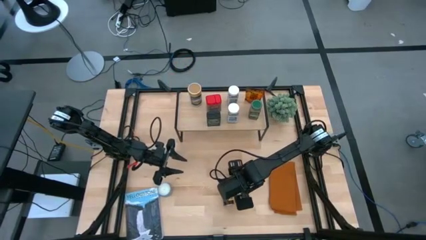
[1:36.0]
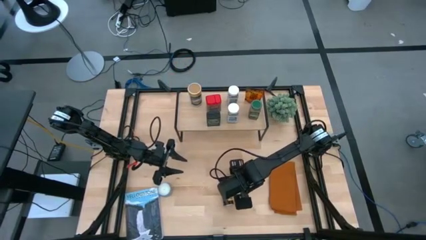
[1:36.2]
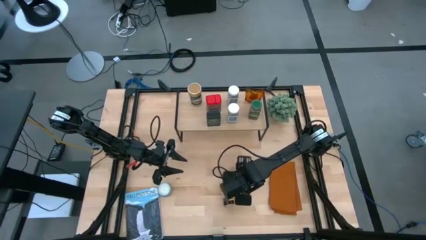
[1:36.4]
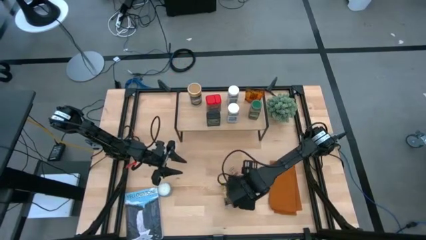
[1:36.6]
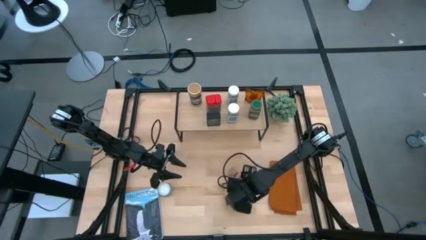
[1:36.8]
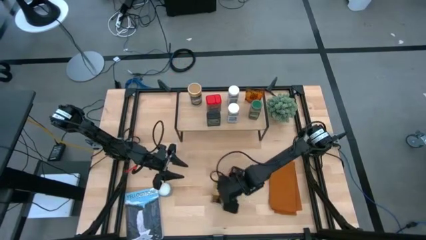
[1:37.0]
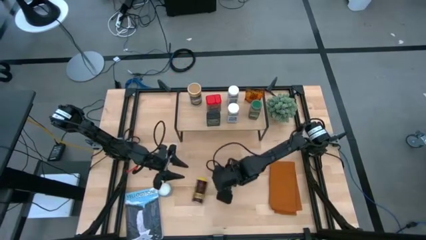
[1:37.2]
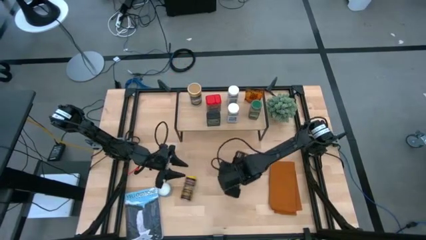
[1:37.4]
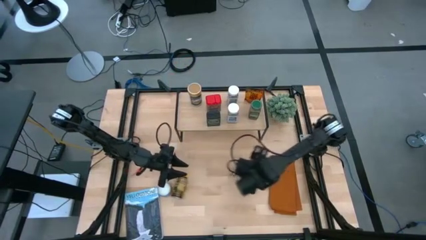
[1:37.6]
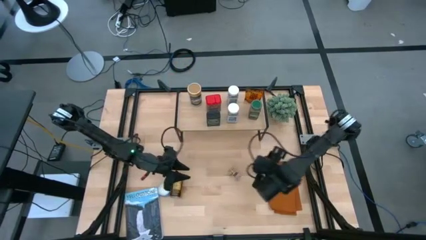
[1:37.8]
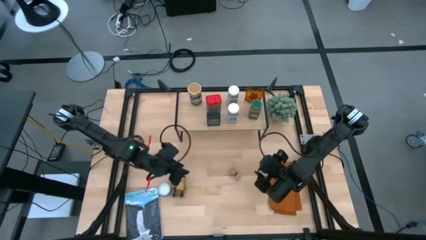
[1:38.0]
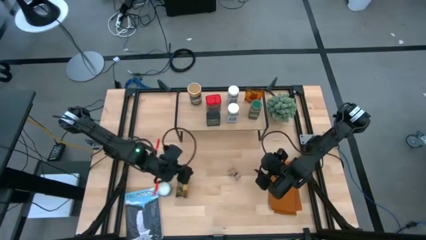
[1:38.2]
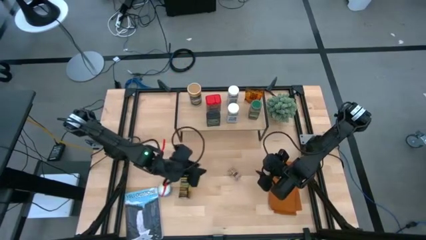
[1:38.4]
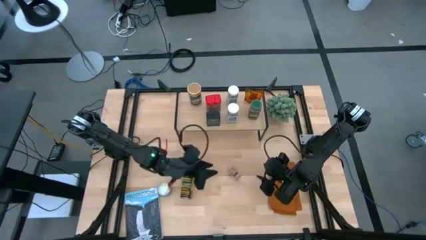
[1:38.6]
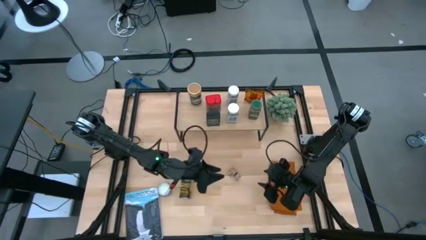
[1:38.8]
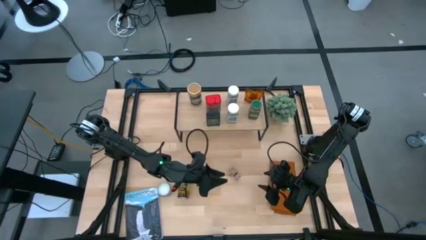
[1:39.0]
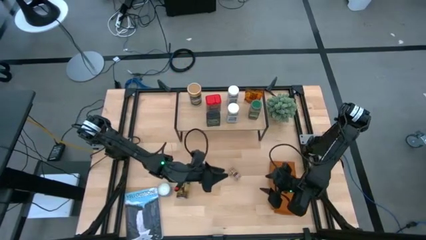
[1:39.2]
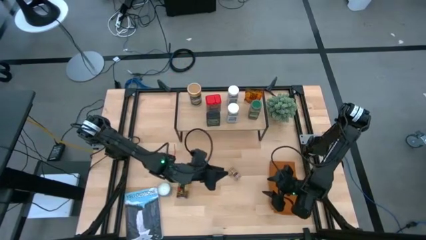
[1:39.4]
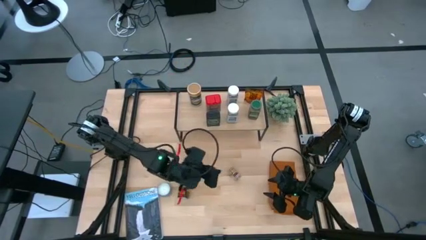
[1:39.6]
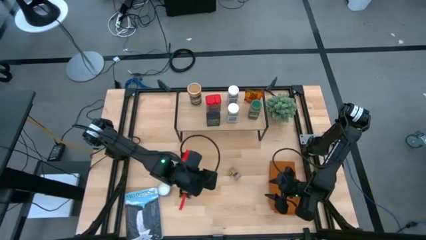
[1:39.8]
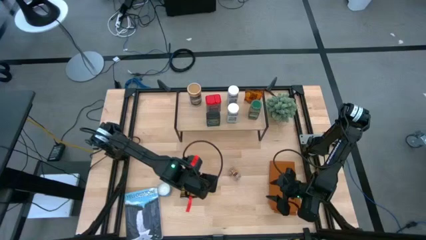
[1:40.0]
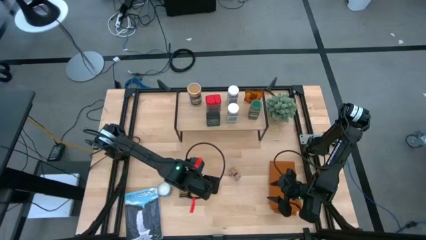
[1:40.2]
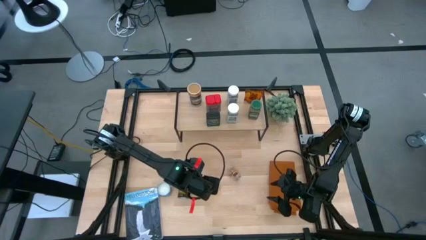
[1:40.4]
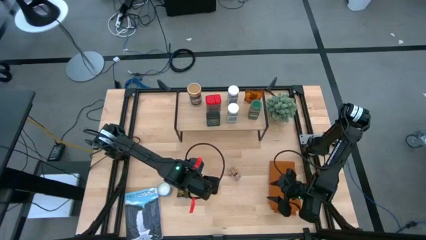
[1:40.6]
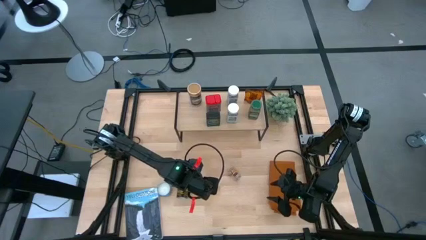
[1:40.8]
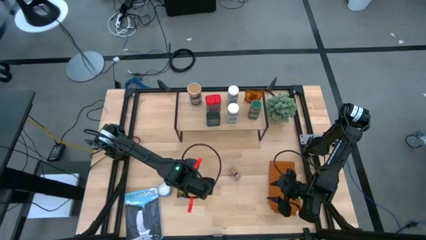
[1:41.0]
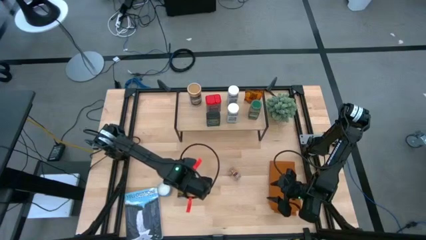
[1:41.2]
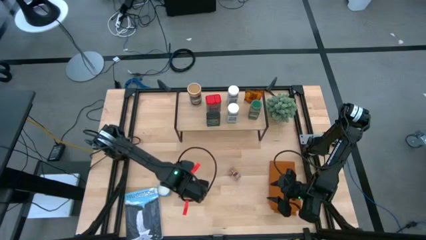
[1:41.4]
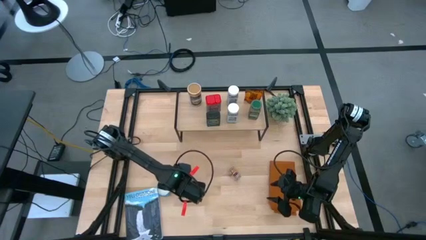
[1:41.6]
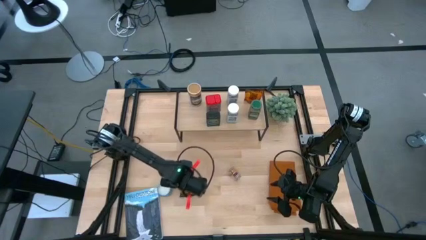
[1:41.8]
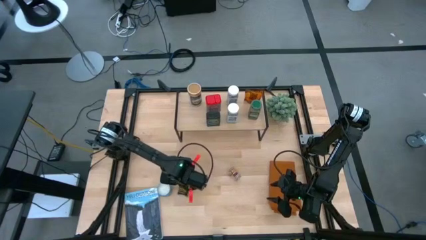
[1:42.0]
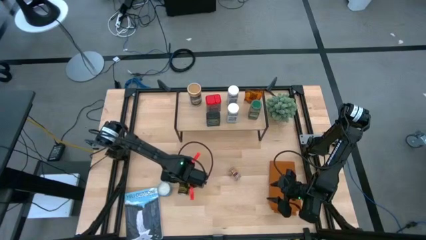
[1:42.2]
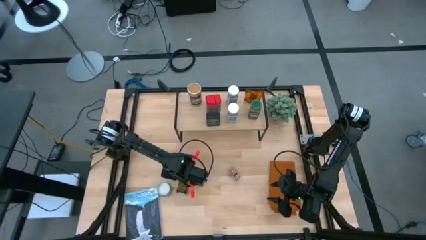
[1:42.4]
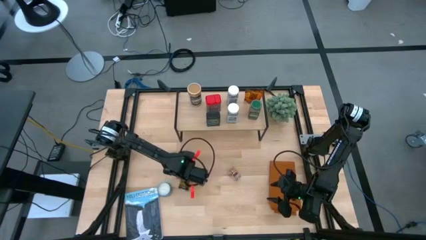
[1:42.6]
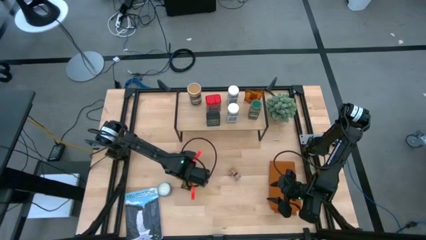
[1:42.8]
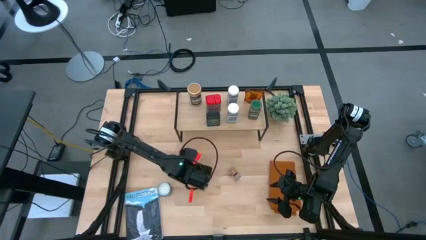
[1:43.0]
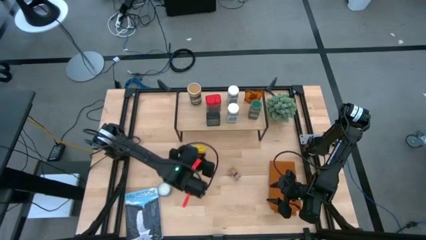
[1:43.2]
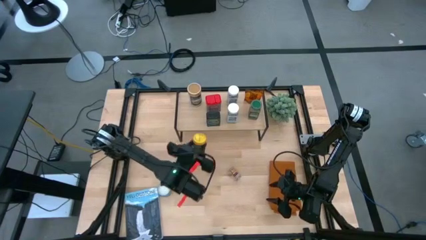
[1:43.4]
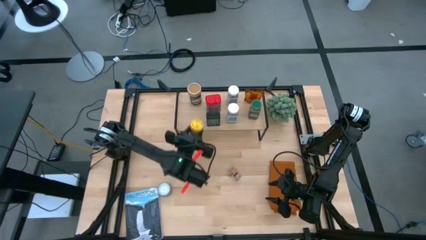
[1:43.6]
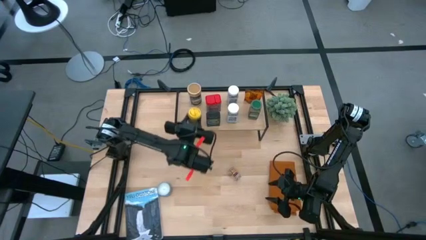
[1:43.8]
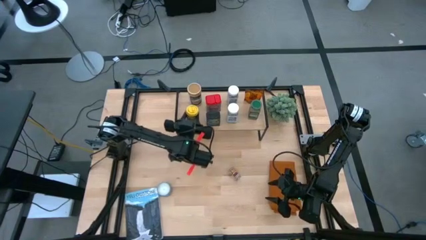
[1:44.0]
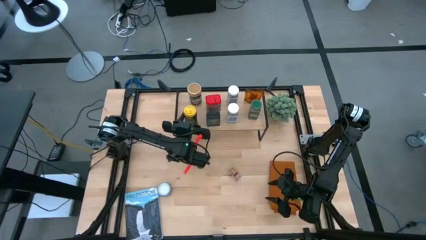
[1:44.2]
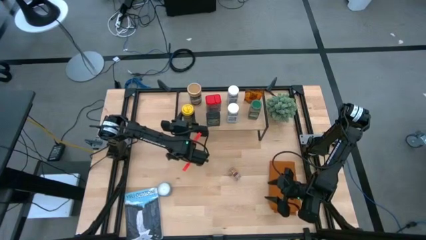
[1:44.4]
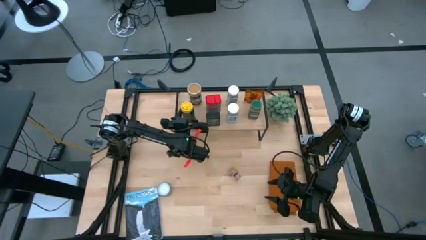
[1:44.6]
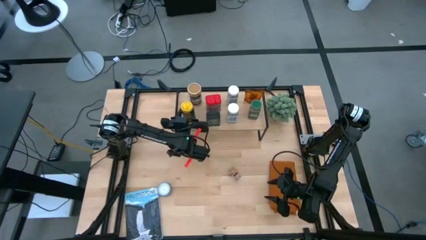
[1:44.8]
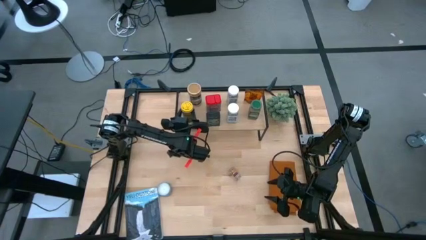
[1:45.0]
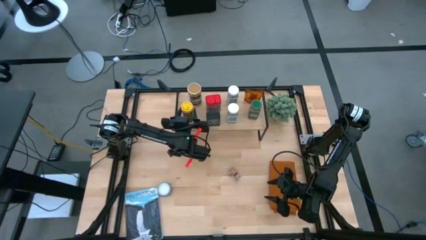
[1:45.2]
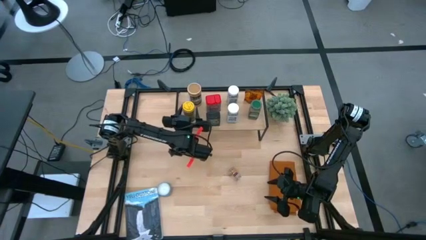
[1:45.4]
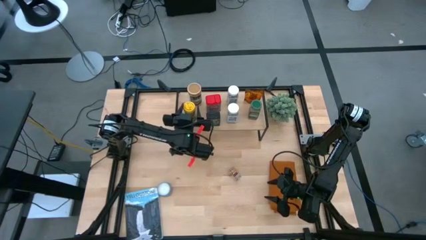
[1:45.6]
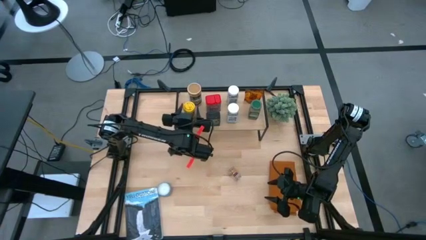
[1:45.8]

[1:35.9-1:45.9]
Task: Shelf spices
Put the yellow seasoning bottle on the shelf

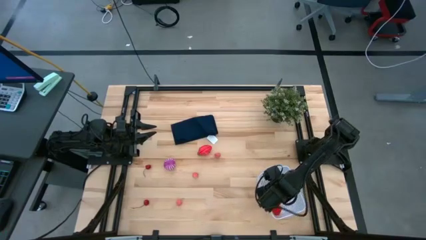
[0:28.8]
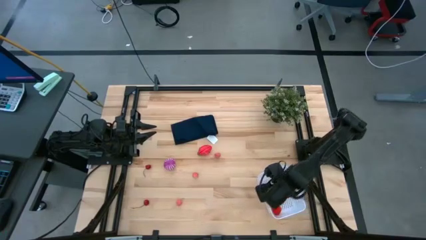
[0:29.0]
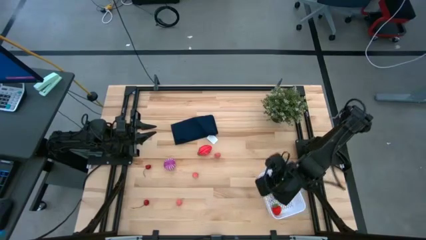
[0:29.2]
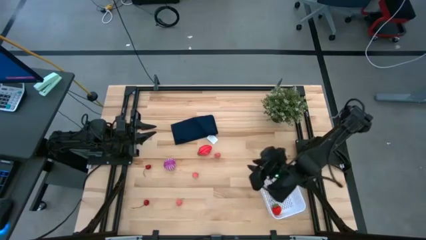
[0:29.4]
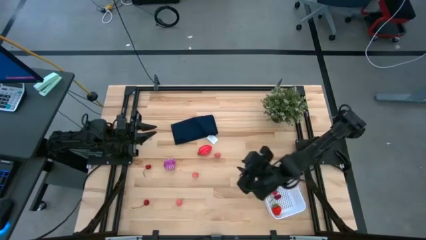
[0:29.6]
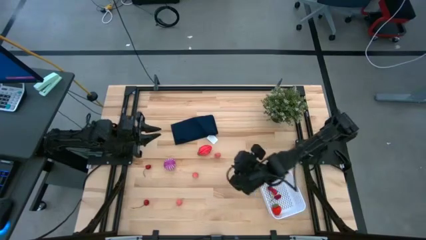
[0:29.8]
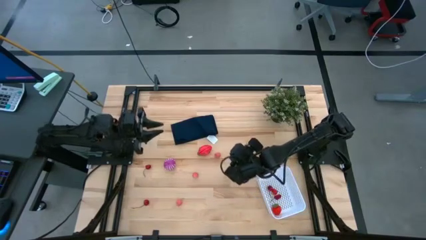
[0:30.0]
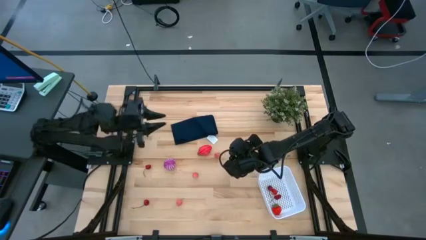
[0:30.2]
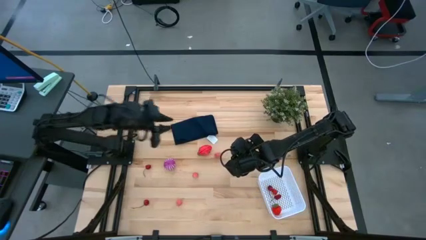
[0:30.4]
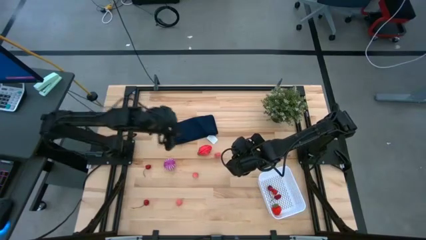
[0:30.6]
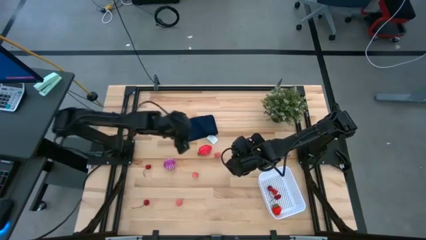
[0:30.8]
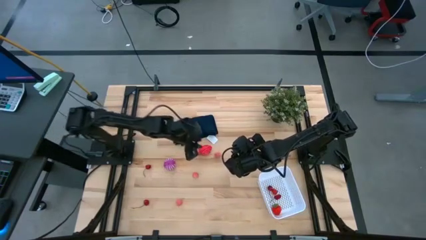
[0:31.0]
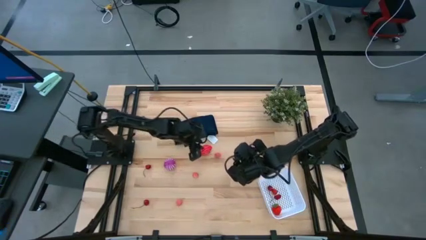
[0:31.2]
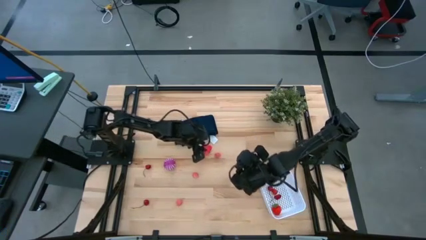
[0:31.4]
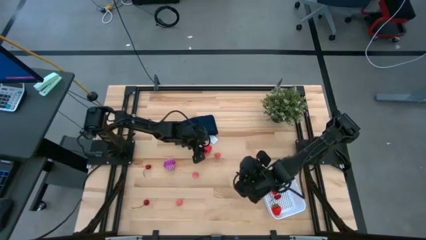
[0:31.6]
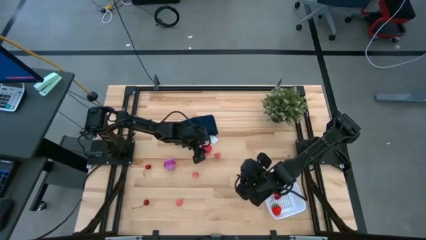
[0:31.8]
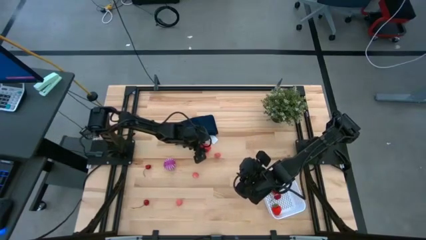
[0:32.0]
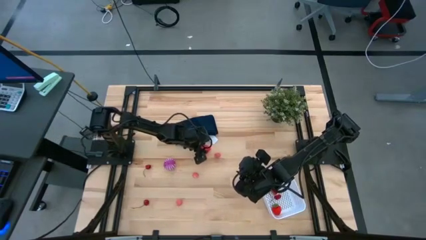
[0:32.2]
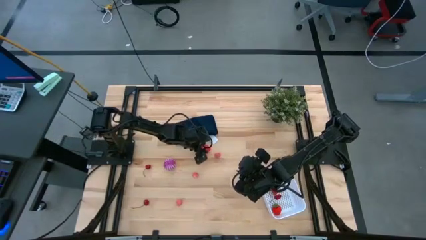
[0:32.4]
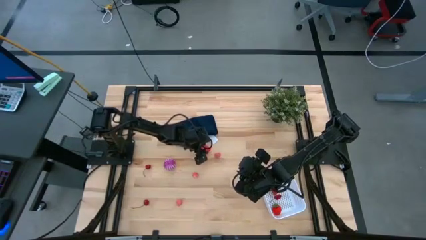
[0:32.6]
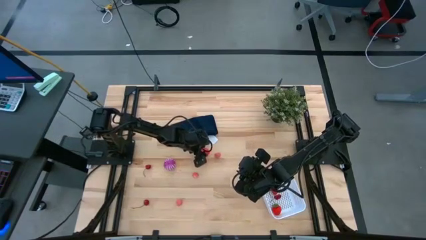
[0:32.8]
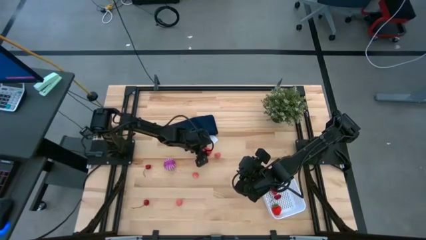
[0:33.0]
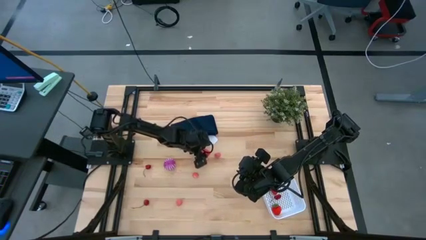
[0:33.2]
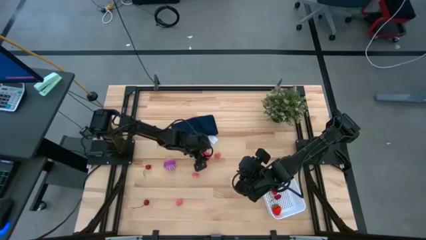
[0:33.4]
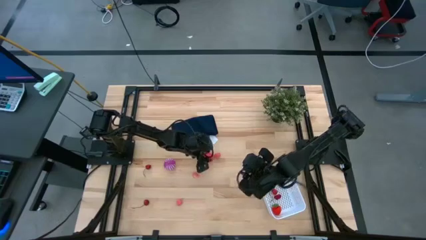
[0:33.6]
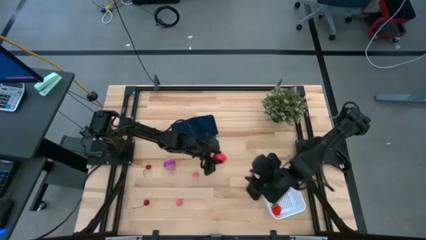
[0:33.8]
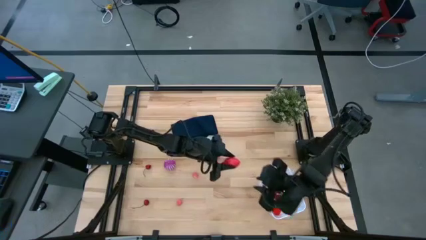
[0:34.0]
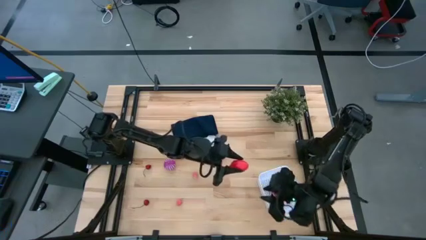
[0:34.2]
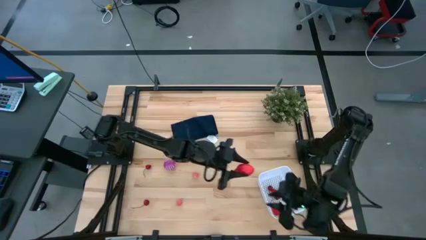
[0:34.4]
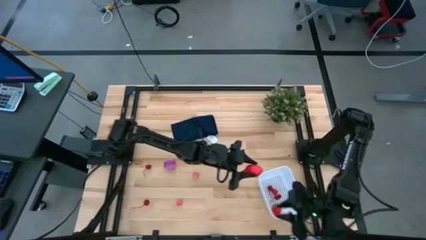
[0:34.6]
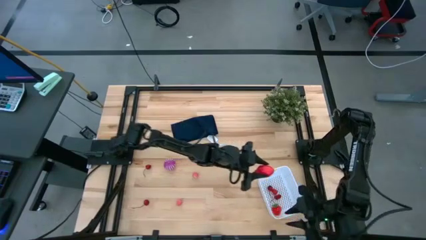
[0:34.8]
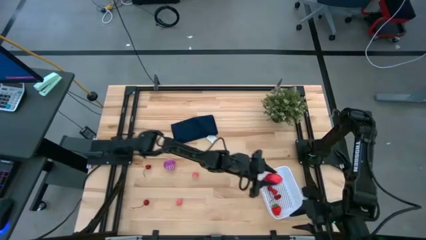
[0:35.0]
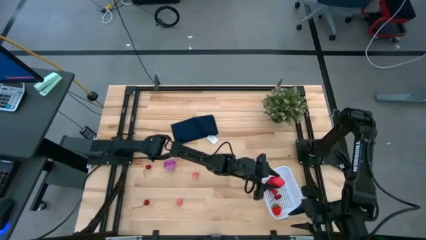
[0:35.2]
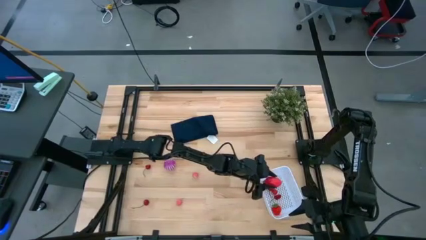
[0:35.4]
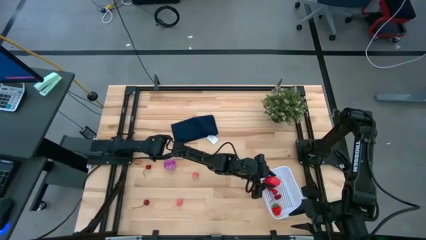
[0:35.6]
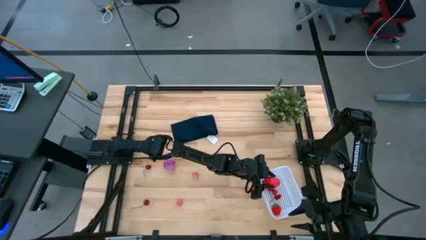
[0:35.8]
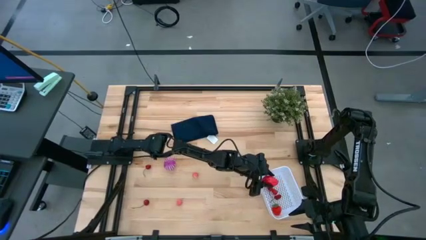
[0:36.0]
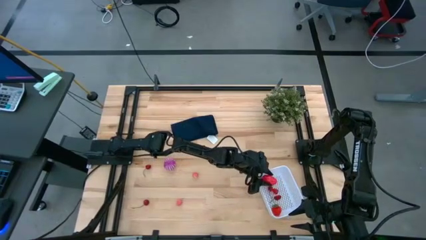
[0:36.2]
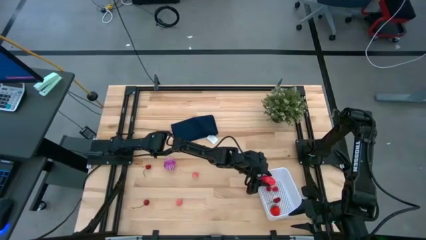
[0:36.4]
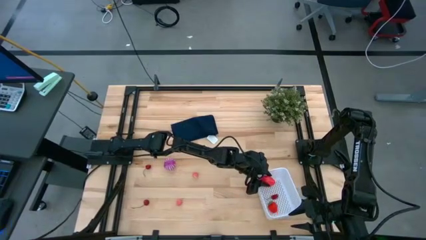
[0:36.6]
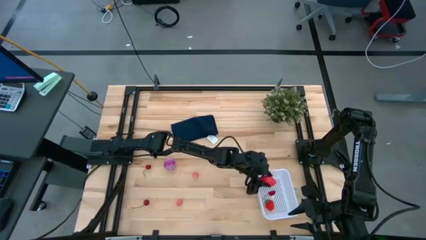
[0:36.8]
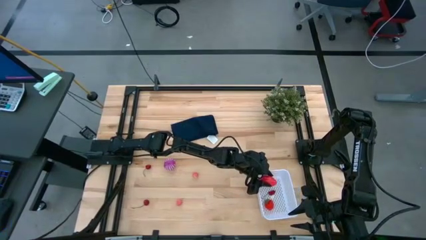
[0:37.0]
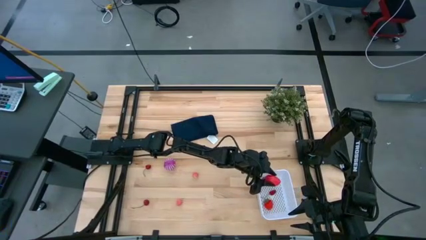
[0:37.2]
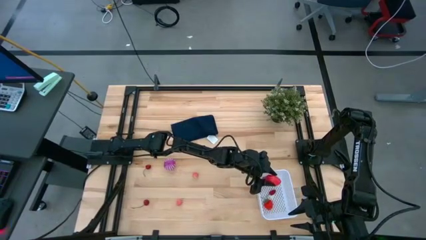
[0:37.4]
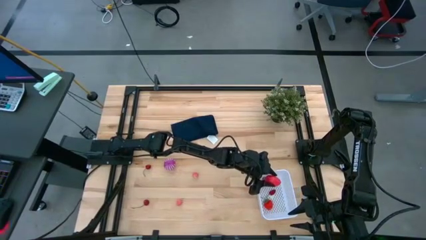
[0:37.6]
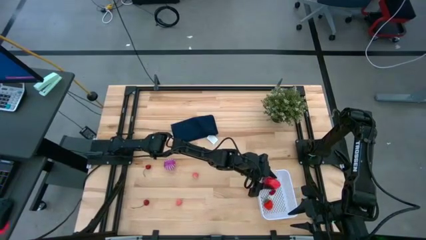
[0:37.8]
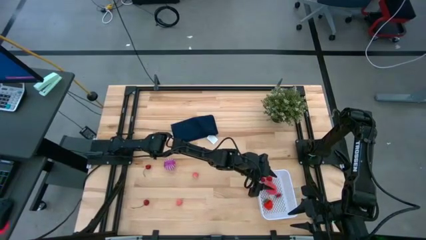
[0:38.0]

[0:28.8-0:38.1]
Task: Pick and placing Produce into tupperware
Put the dragon fruit into the white bin
